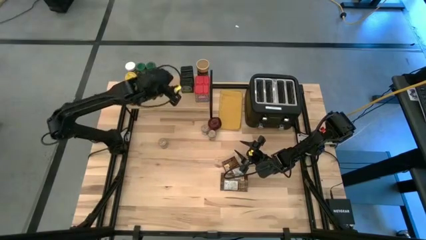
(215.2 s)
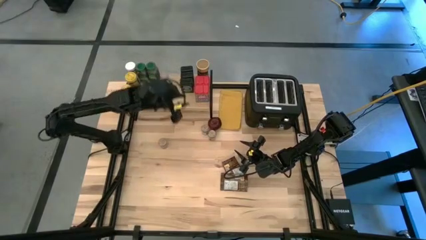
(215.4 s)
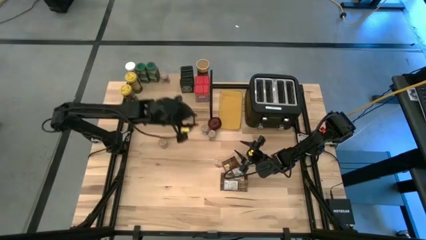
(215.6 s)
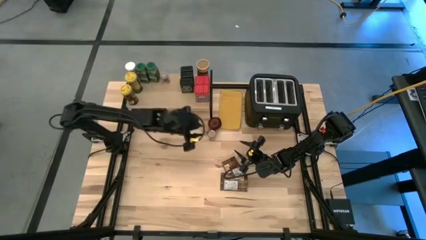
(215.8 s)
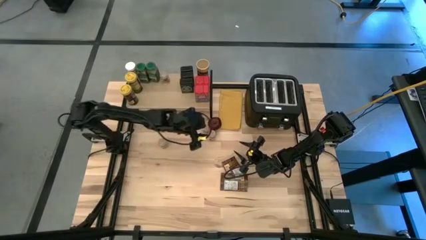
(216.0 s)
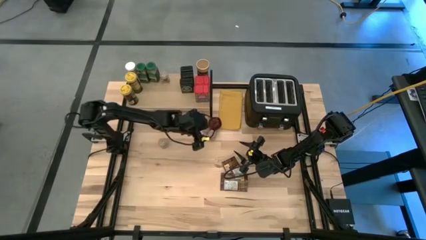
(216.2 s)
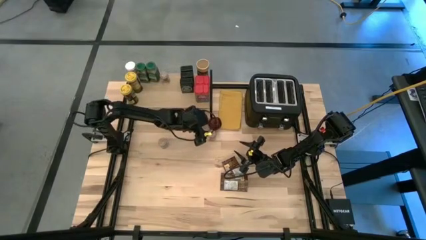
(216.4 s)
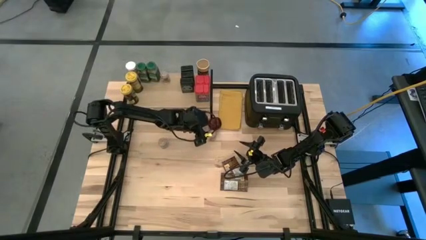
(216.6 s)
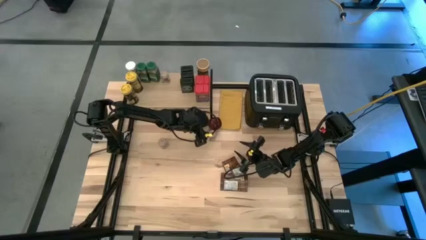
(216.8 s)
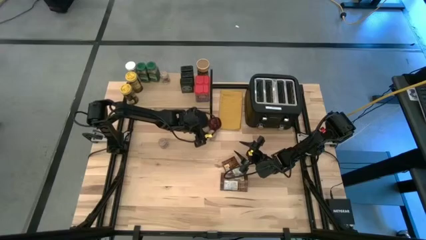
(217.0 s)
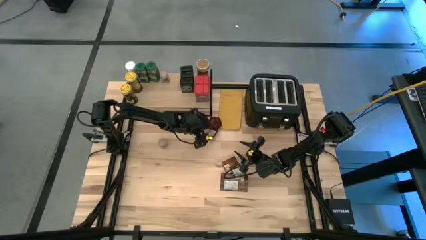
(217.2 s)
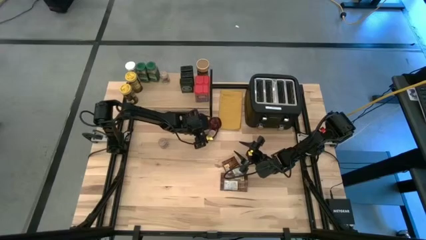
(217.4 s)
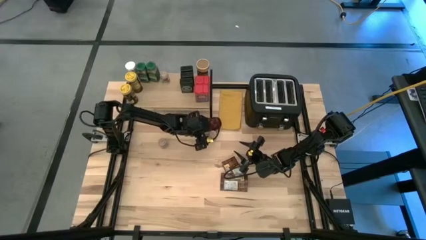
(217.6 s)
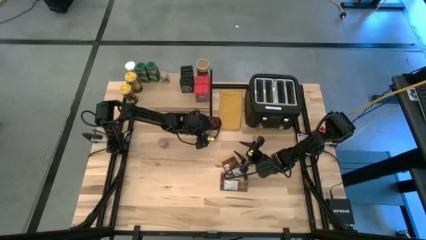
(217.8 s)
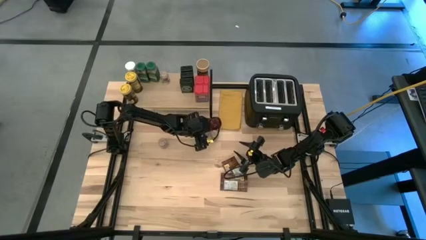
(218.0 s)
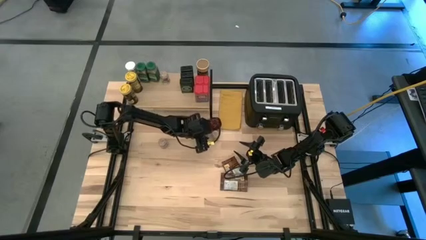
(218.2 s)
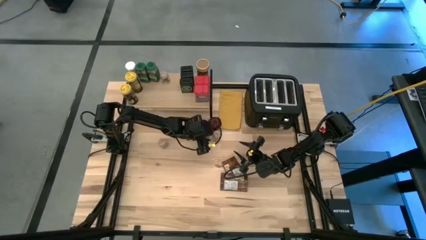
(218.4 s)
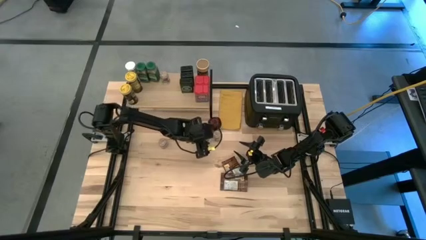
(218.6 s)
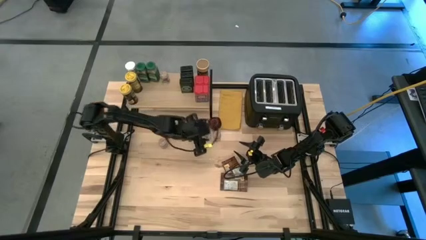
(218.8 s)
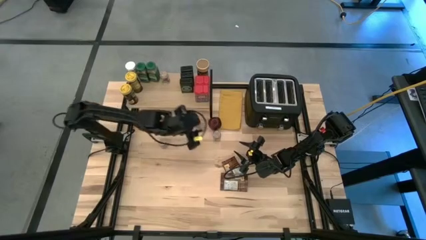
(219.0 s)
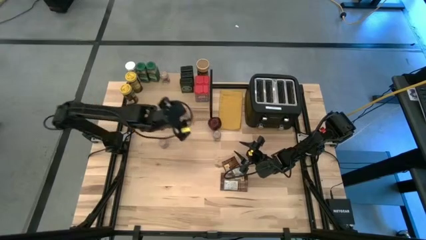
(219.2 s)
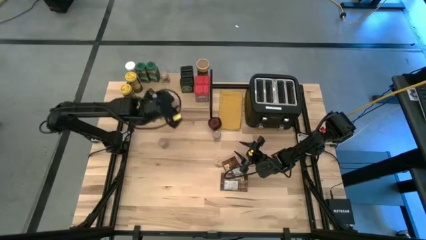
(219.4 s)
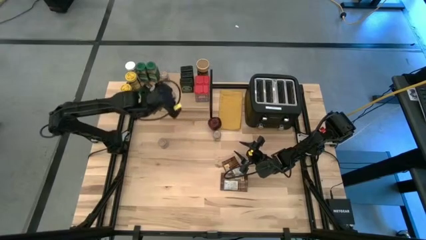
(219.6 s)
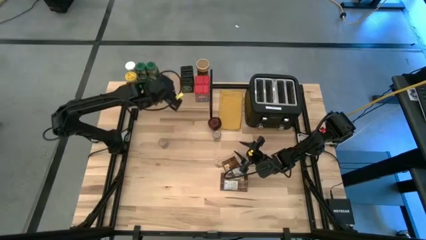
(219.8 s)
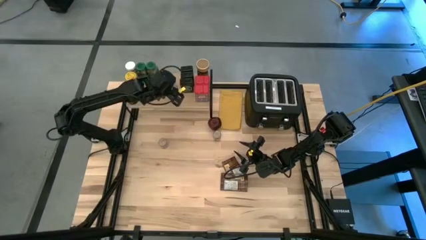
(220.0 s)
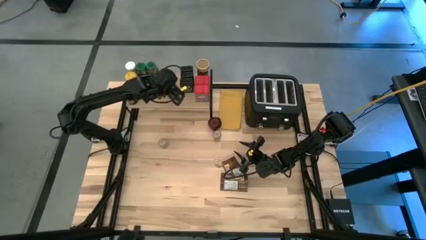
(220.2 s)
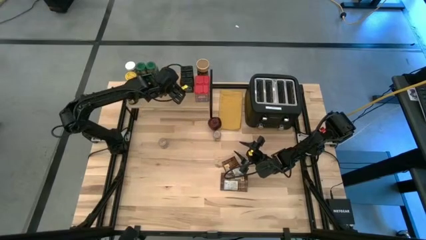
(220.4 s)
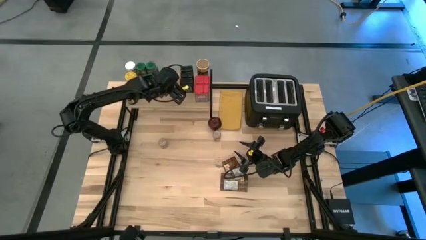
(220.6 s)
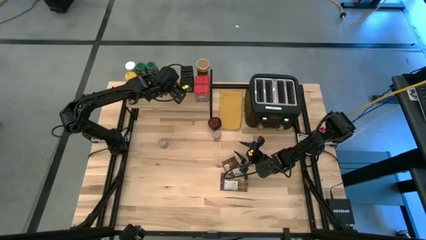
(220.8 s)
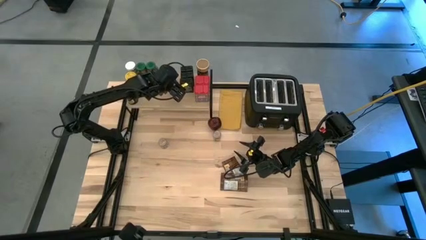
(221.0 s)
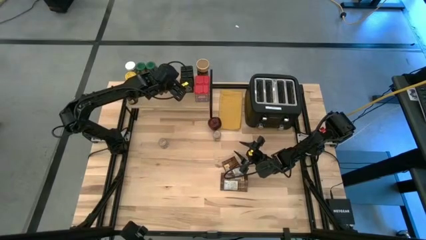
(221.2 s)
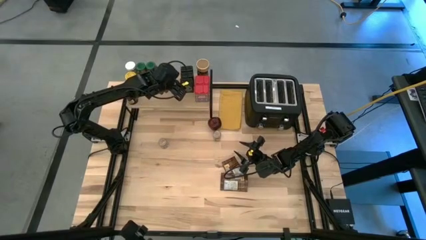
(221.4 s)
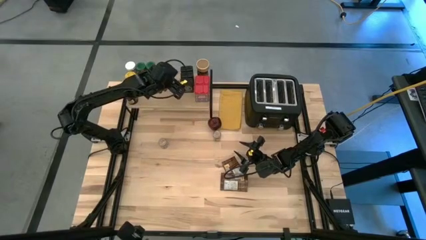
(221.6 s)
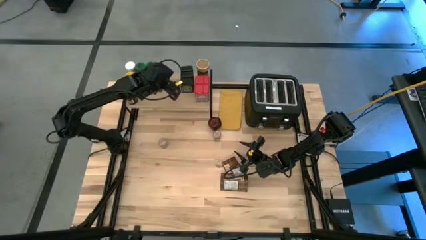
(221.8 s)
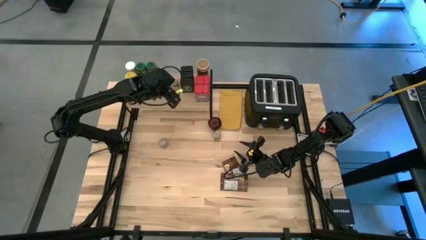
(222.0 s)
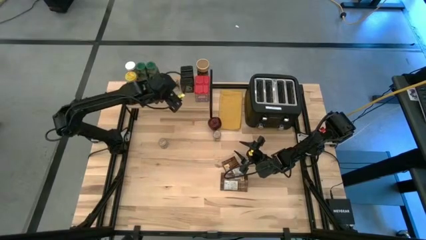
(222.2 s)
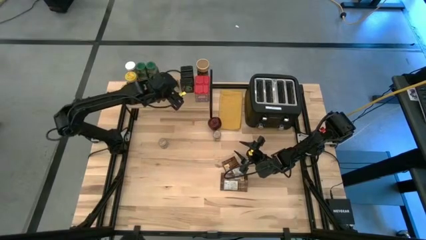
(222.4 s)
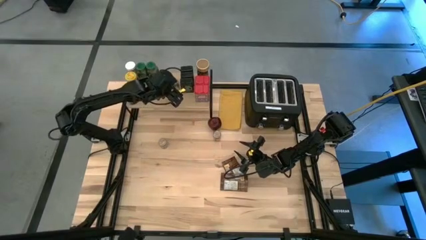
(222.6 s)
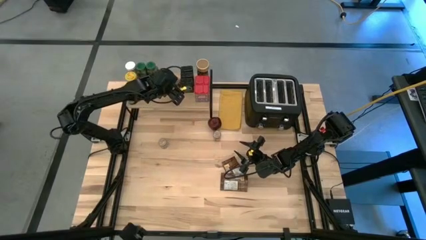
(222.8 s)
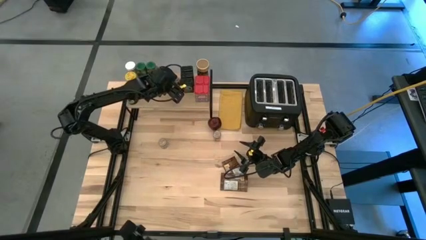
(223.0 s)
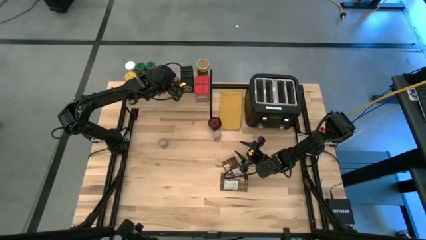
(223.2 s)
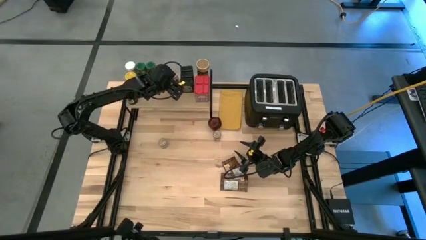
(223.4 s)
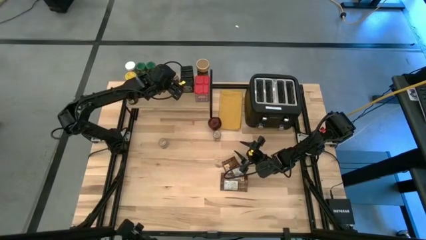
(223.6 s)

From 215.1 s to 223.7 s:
Task: Shelf spices
Put the center brown seasoning bottle aligned with the other brown seasoning bottle on the shelf

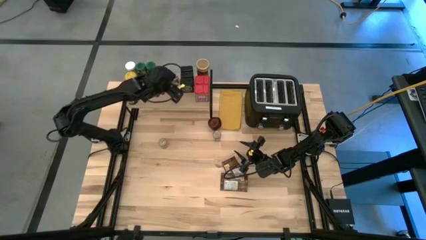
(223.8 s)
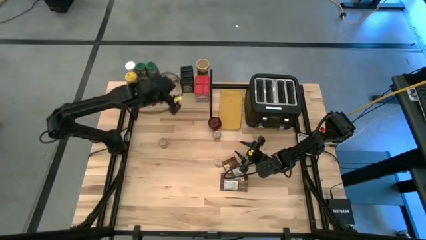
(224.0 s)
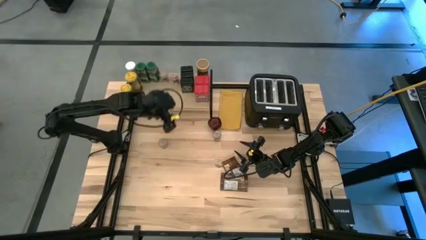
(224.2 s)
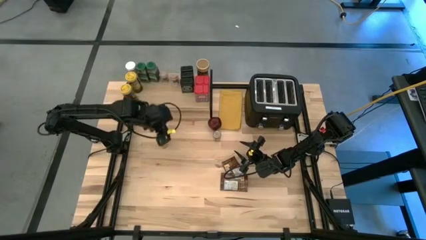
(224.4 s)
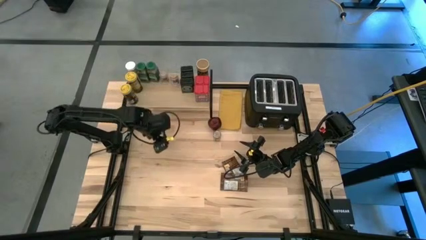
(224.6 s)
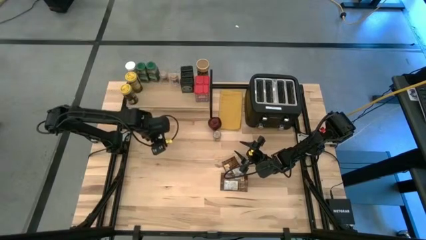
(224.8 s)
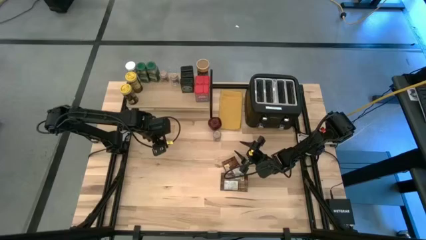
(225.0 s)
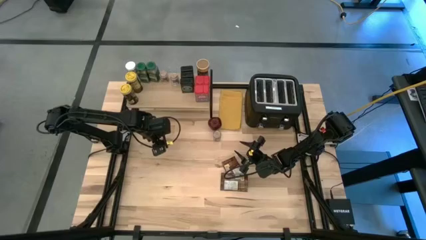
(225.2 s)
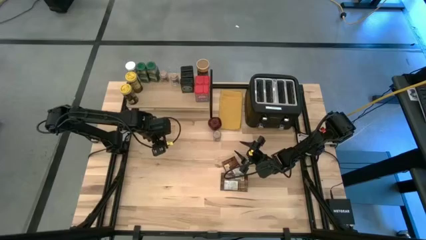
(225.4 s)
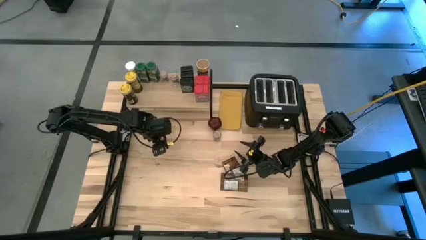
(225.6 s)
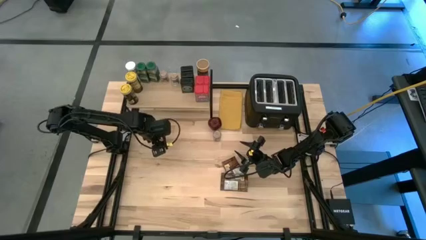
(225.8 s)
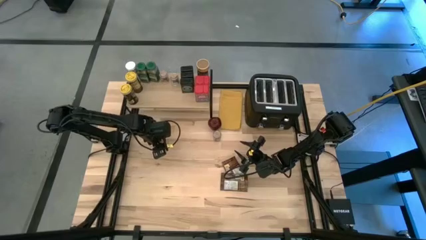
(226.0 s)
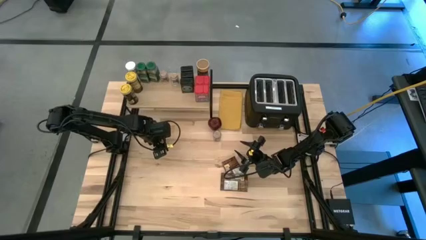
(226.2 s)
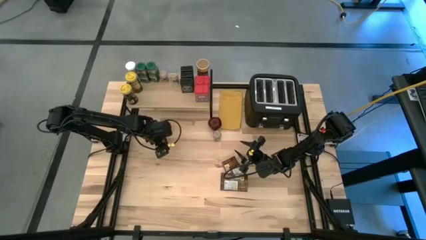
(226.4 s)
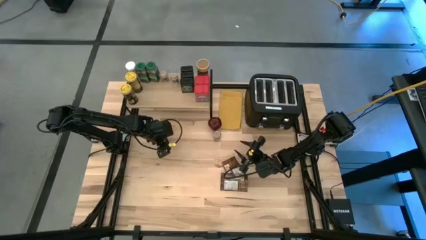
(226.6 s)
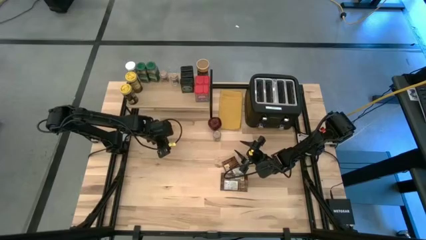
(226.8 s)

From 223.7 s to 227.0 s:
Put the left brown seasoning bottle aligned with the other brown seasoning bottle on the shelf

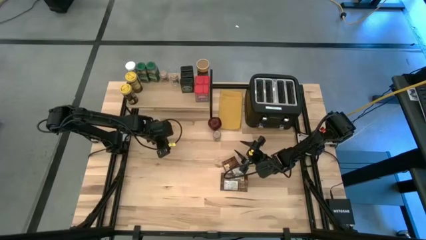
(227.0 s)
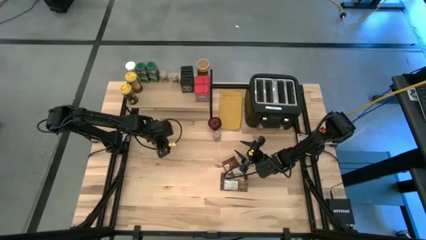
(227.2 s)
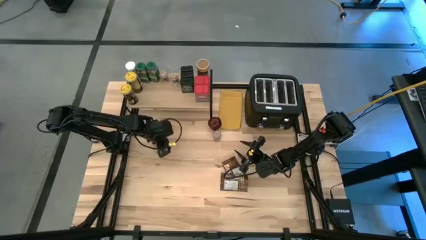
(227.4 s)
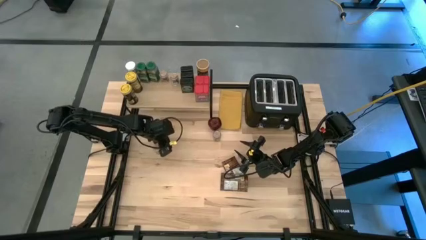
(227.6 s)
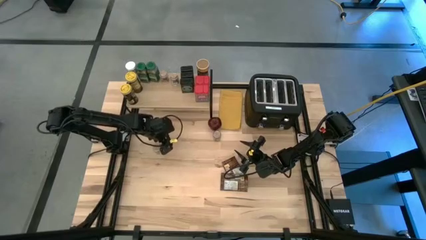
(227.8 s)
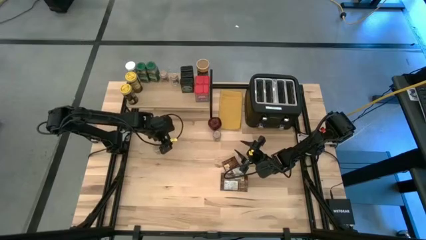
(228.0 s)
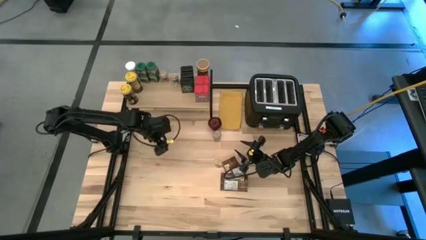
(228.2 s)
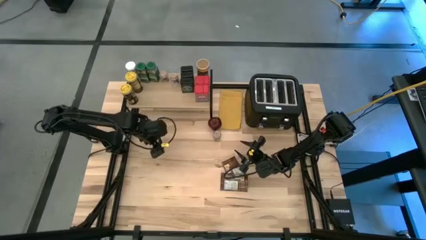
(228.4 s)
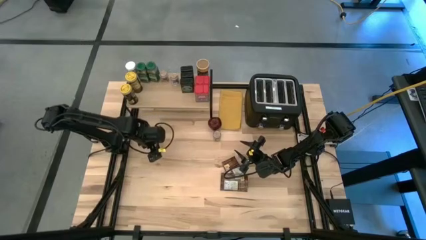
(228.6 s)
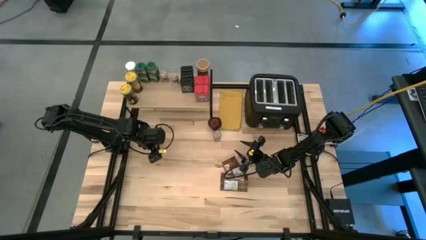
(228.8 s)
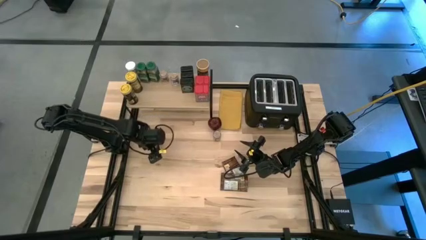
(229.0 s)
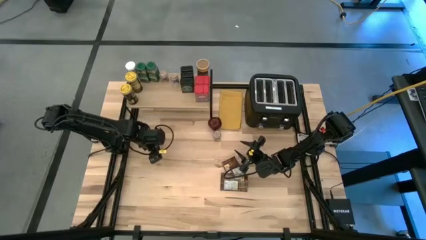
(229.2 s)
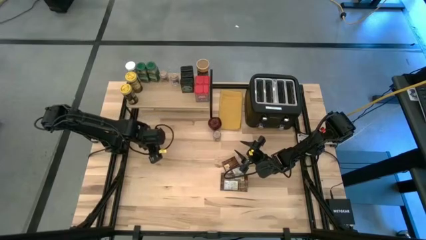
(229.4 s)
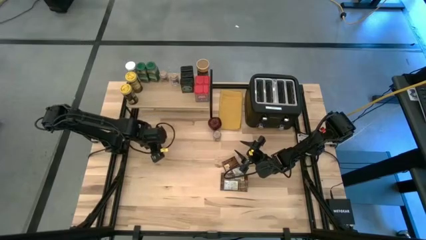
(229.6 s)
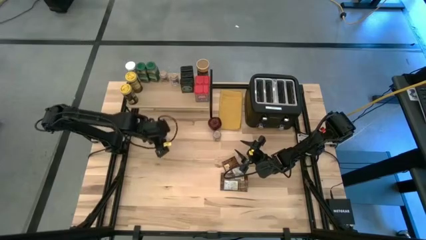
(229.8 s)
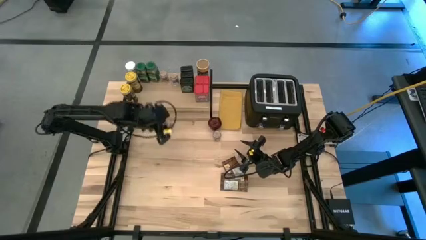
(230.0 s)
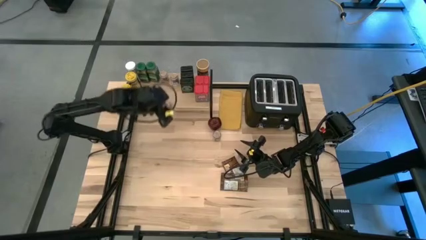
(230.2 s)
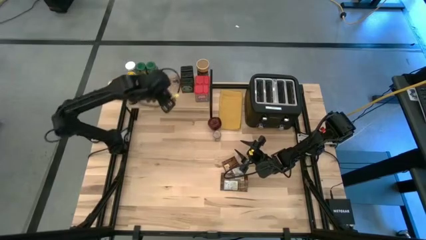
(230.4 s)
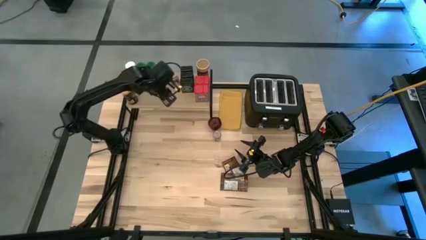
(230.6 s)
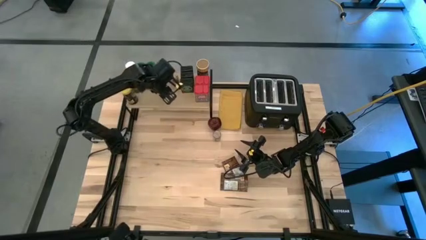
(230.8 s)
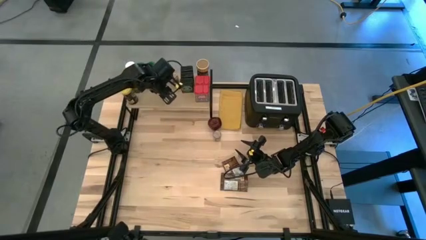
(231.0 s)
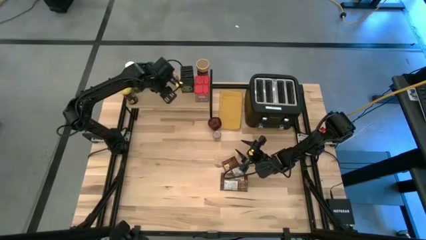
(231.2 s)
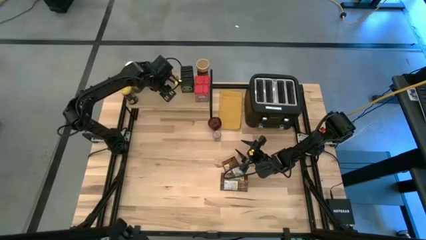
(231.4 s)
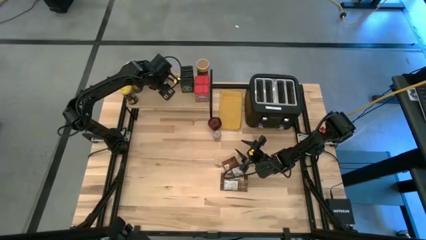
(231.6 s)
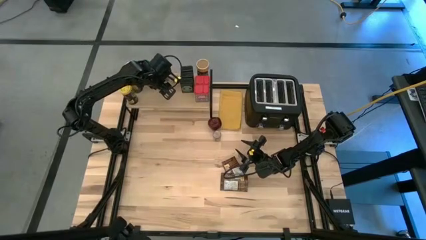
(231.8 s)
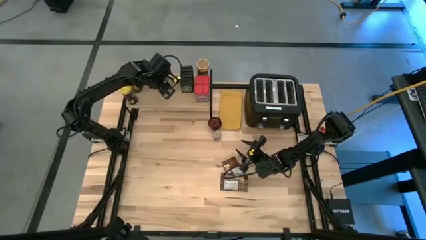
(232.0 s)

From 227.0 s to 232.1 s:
Put the left brown seasoning bottle aligned with the other brown seasoning bottle on the shelf
